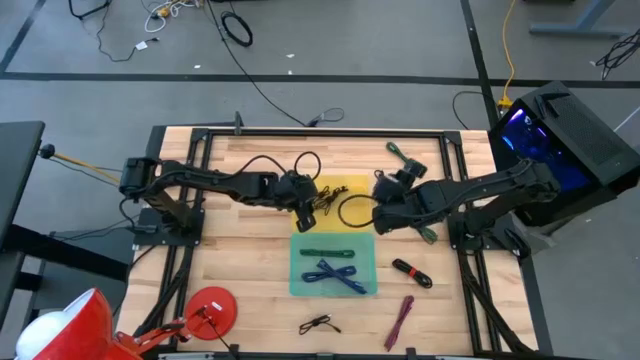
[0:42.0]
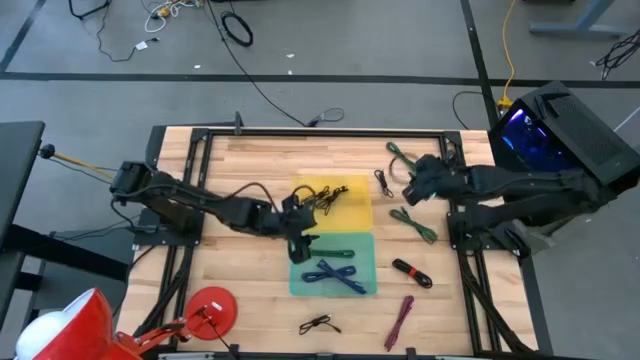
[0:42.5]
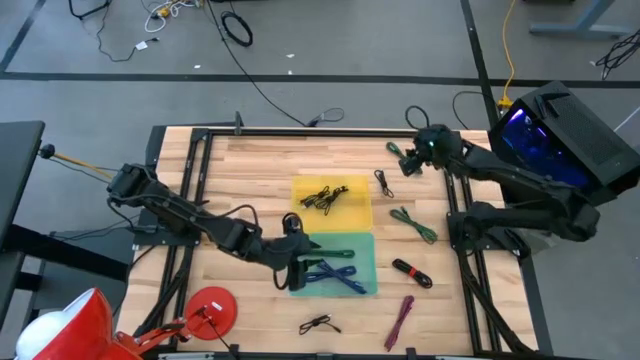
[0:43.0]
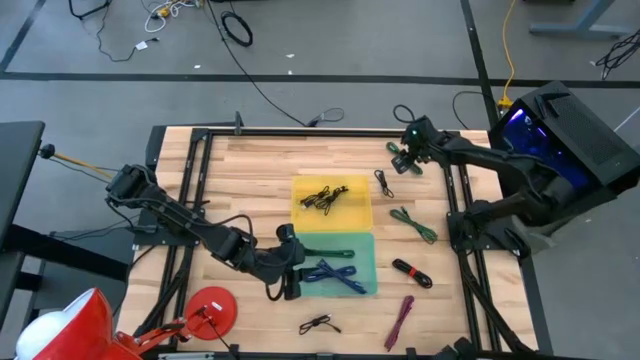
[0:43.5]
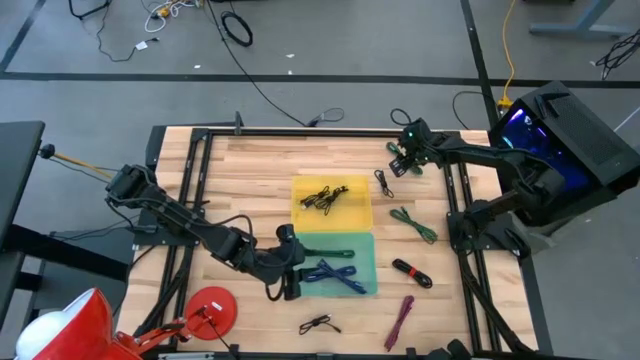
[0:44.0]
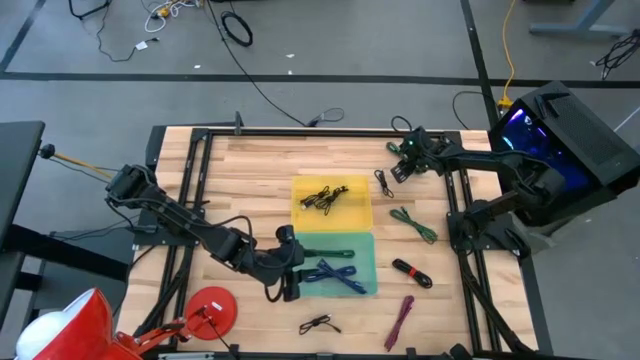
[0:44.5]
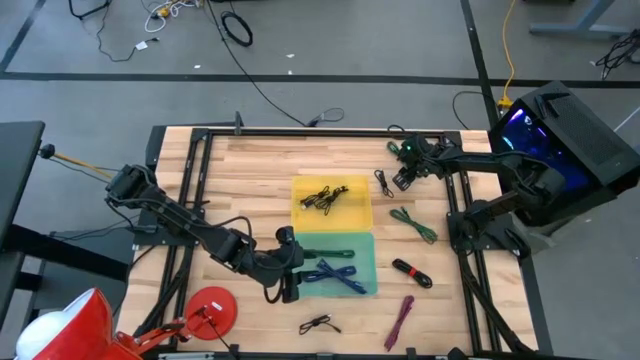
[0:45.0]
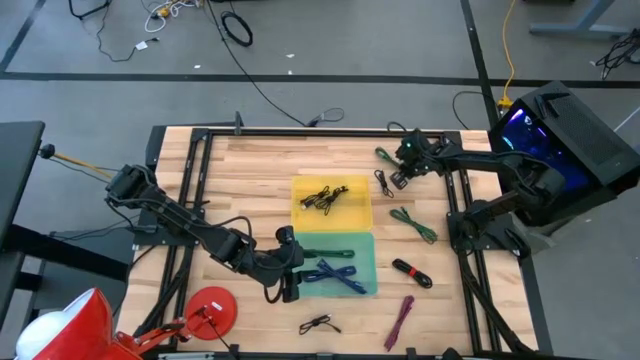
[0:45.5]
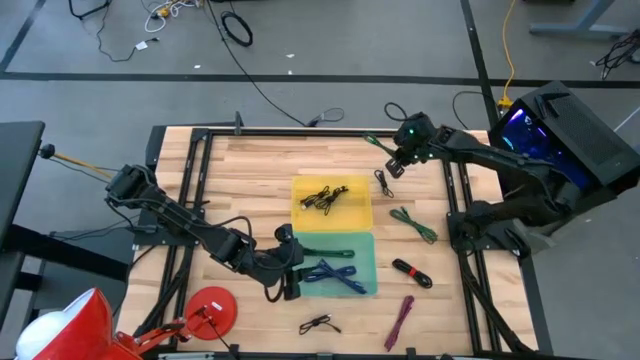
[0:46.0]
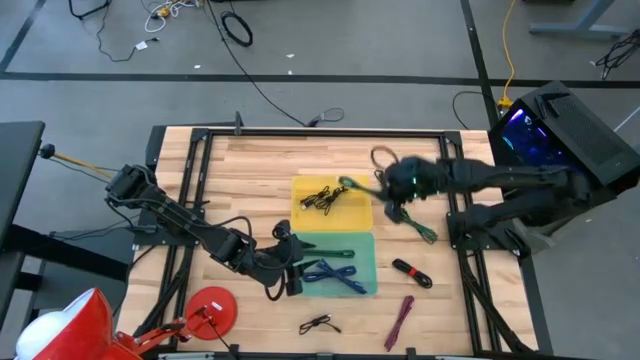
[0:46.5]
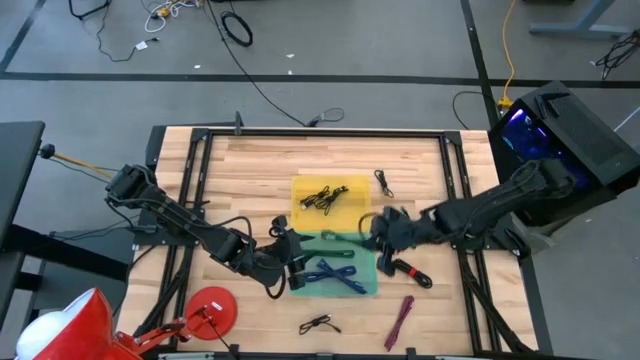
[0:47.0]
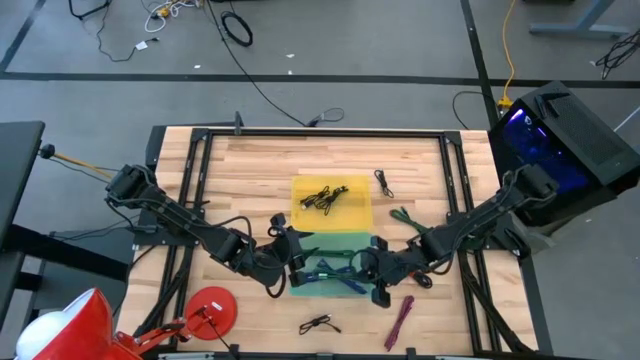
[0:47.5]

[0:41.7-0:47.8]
Task: Pick & Place USB Port
Put the striped green charger cable into the blue bin

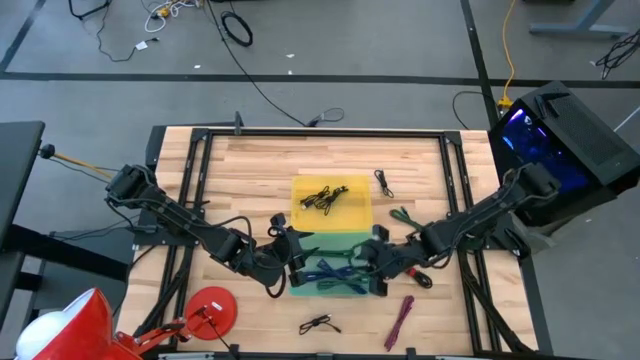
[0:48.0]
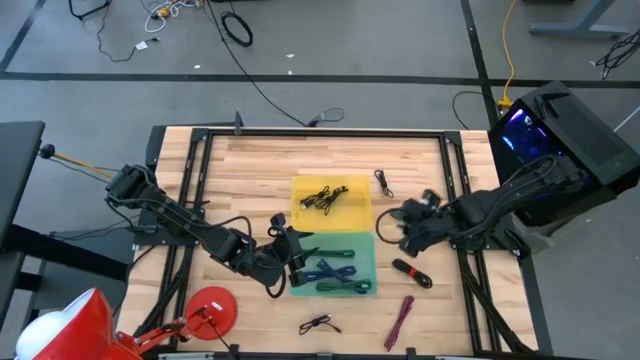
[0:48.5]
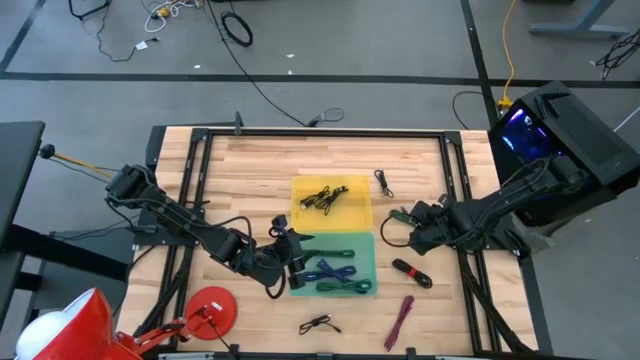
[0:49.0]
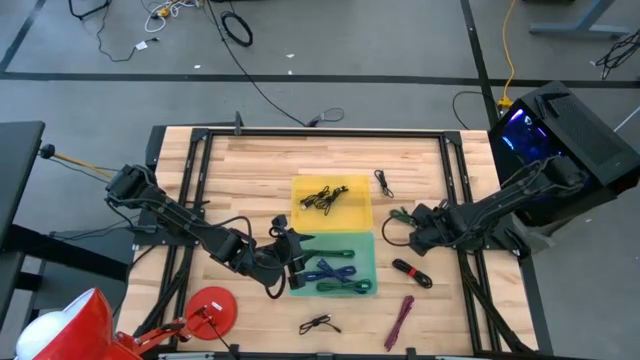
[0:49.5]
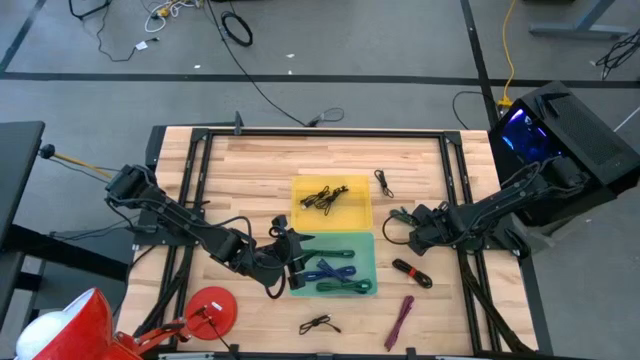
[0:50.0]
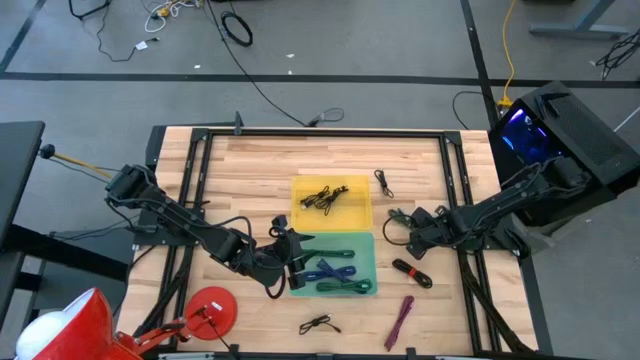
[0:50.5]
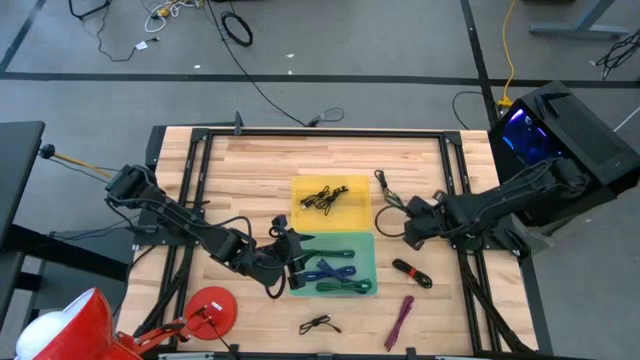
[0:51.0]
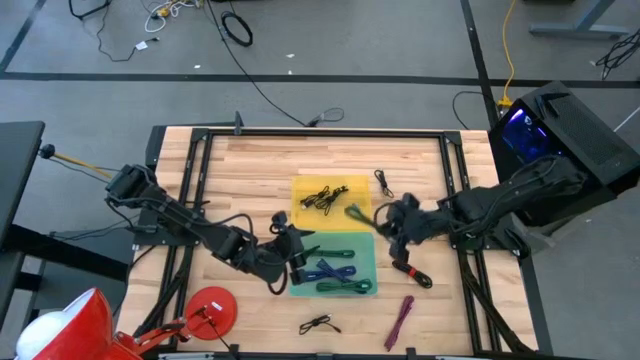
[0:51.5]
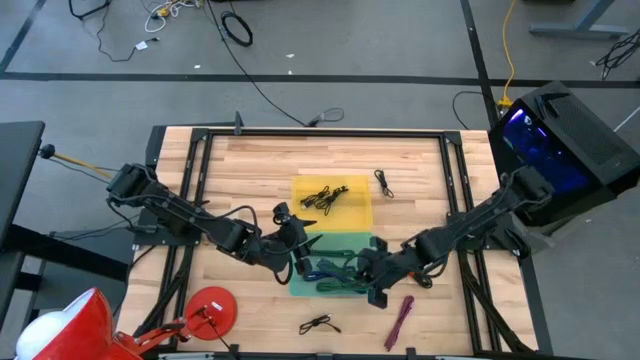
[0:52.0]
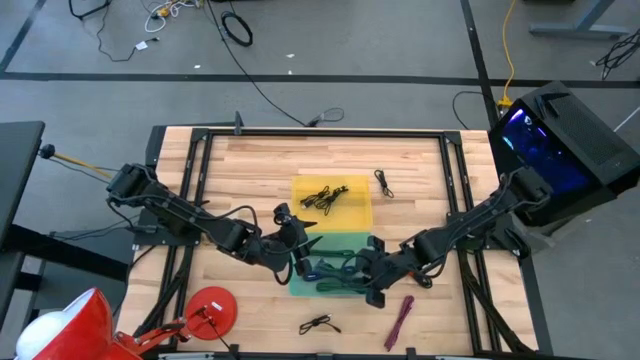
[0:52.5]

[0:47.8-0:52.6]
Put the striped green charger cable into the blue bin

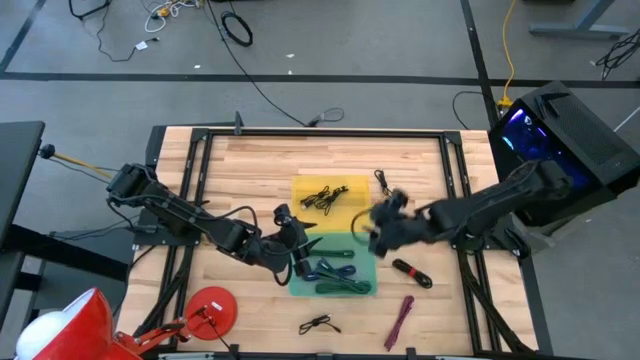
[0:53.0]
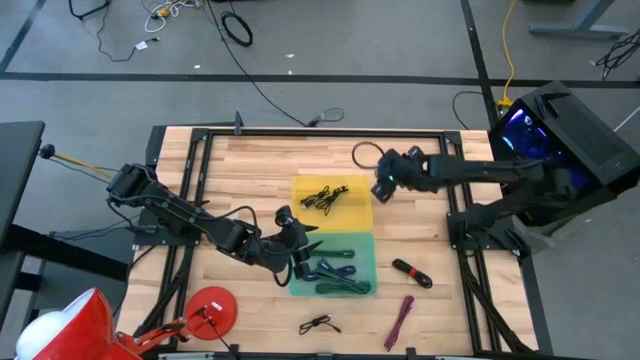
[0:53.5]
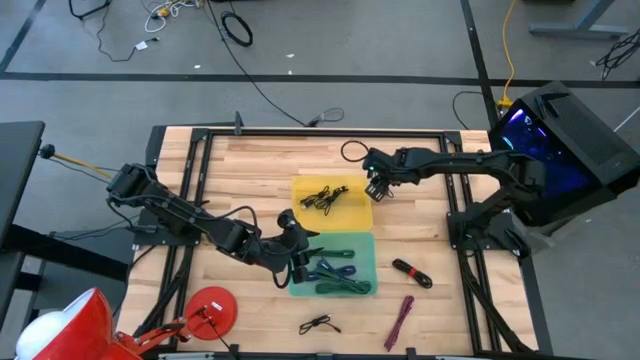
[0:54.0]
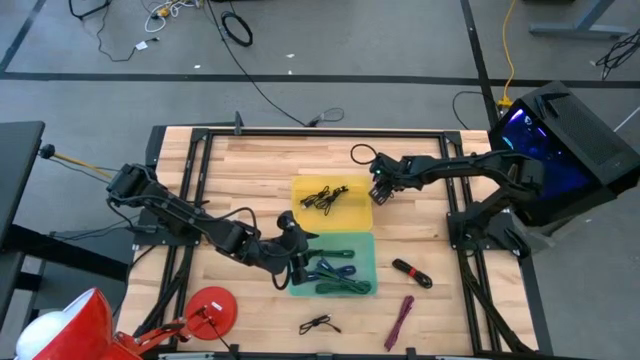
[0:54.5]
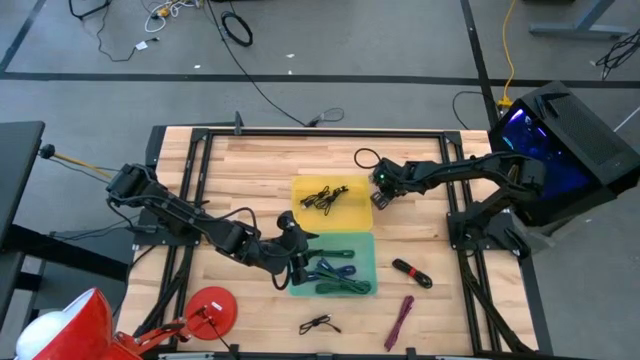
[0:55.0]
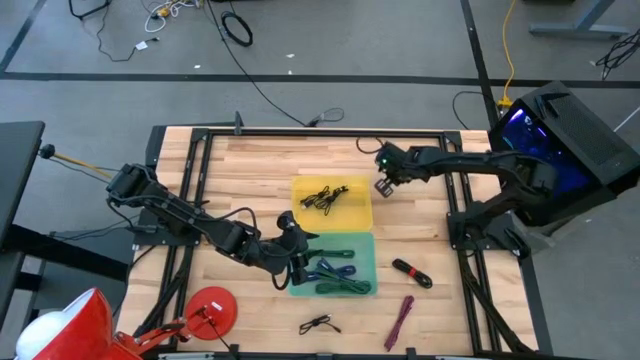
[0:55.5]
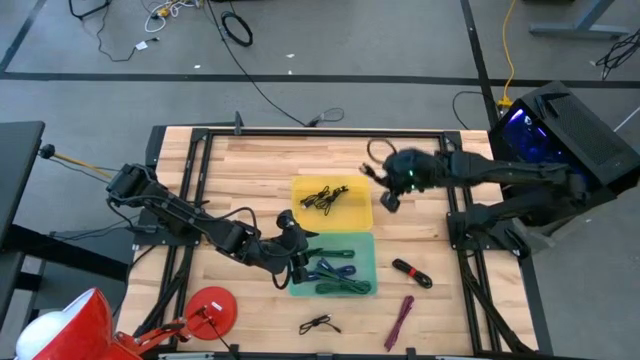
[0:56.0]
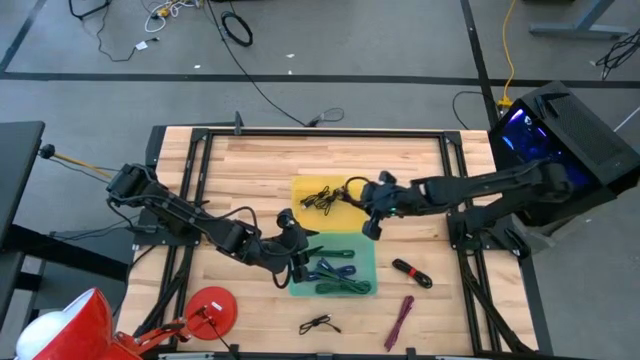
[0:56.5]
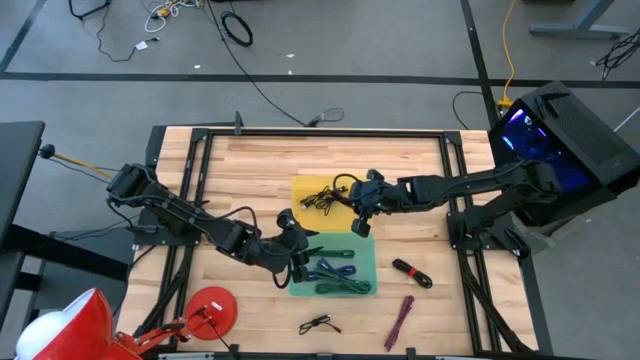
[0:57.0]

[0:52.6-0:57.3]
Put the black charger cable into the yellow bin

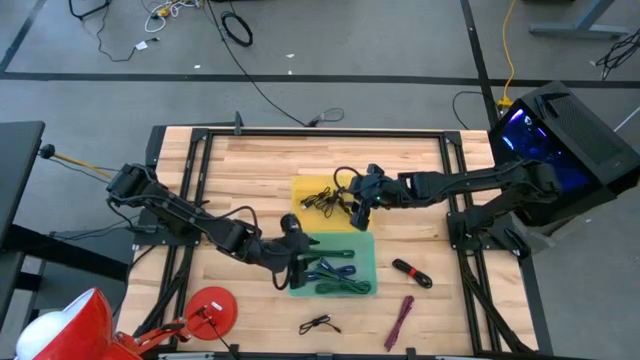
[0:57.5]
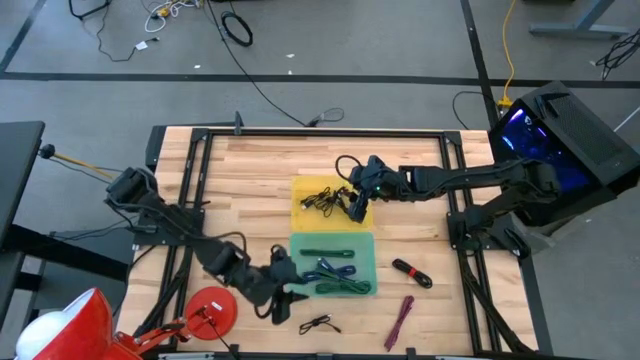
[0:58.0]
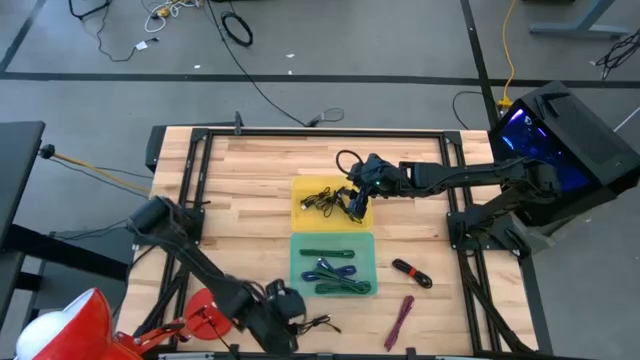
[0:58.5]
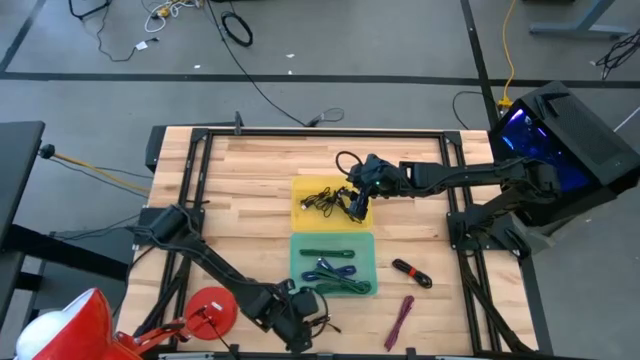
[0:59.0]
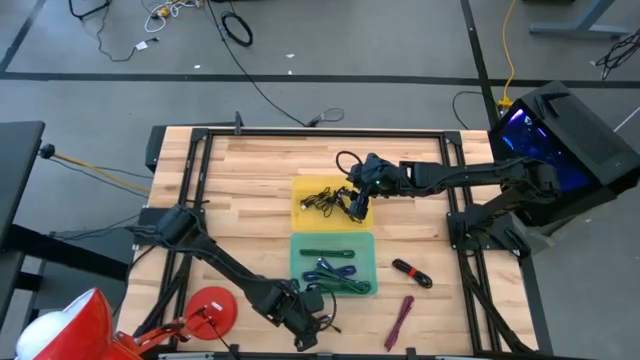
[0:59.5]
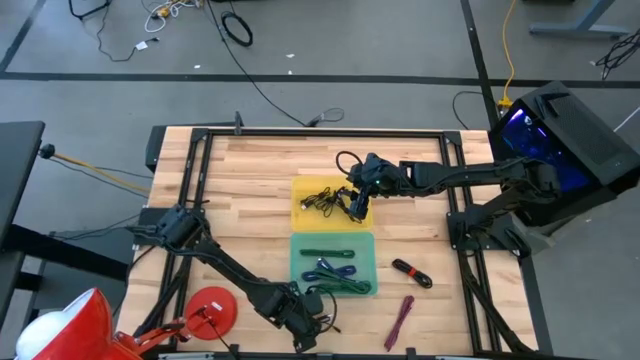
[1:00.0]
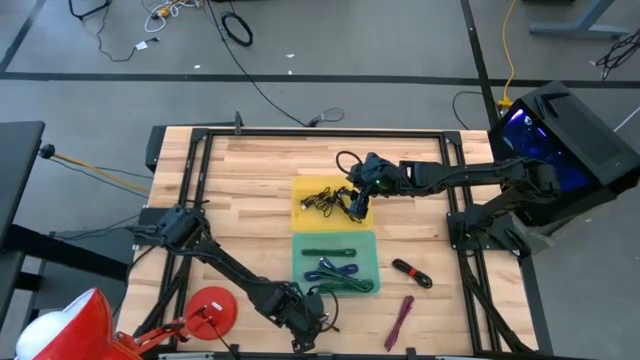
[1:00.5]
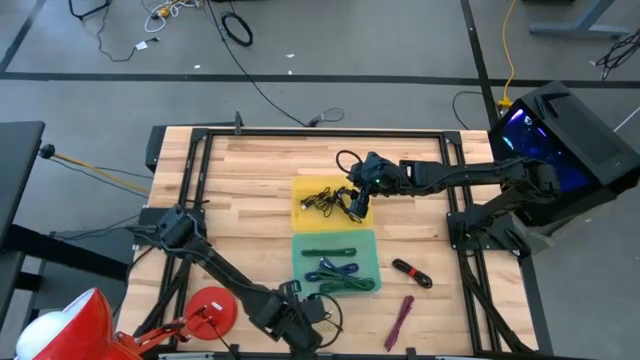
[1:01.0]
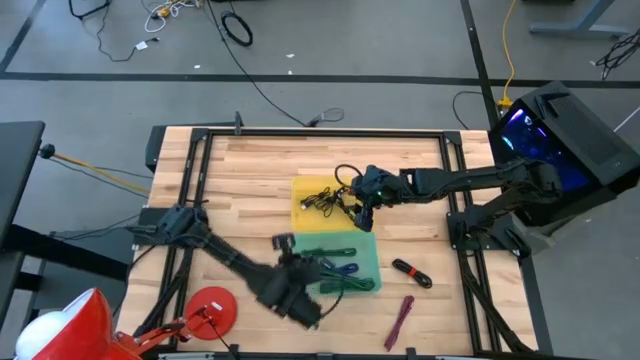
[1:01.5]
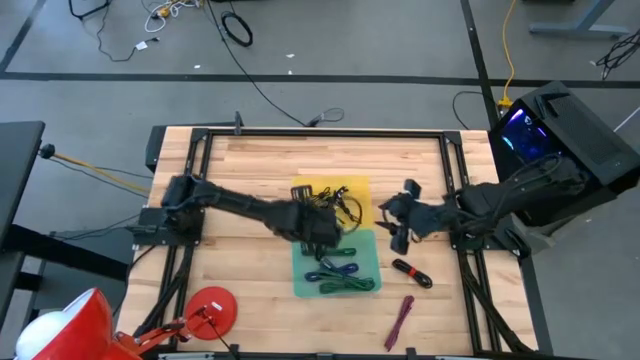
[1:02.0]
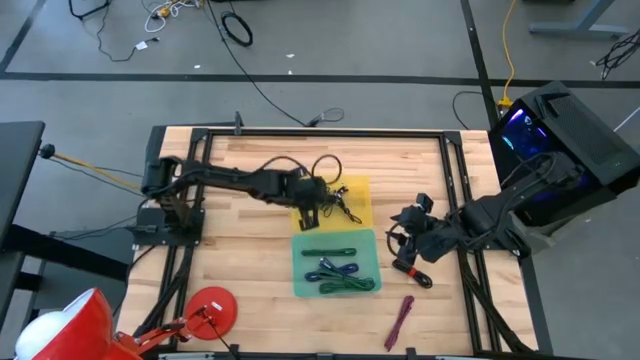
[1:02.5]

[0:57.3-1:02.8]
Put the black charger cable into the yellow bin
